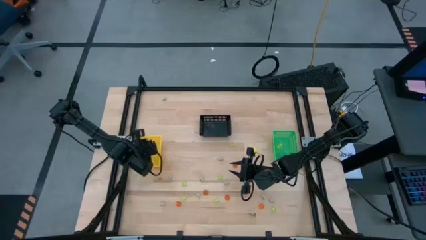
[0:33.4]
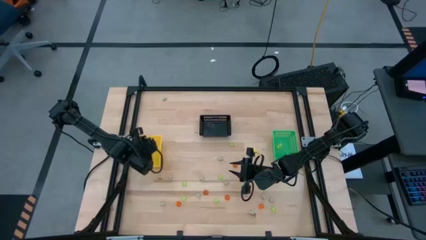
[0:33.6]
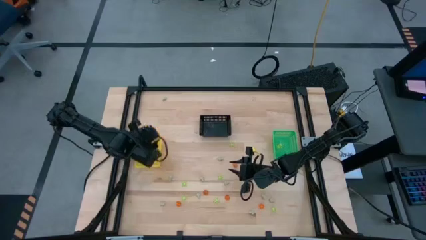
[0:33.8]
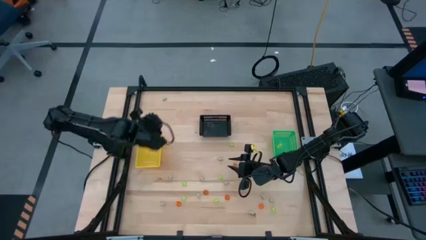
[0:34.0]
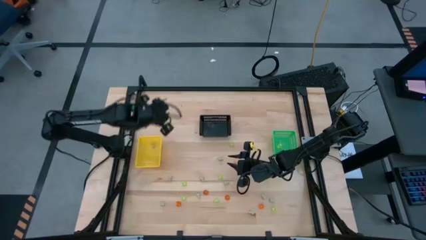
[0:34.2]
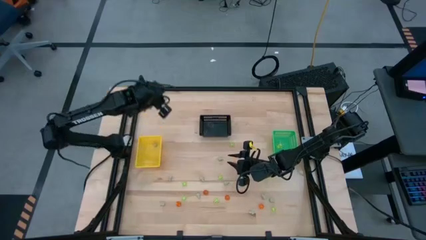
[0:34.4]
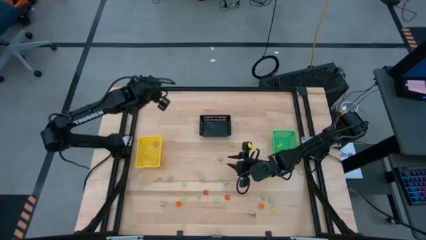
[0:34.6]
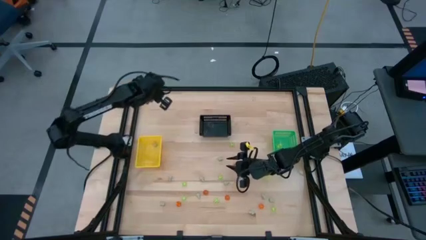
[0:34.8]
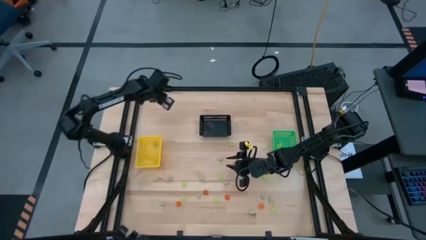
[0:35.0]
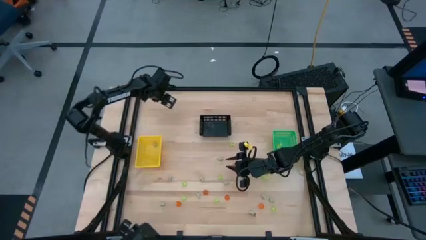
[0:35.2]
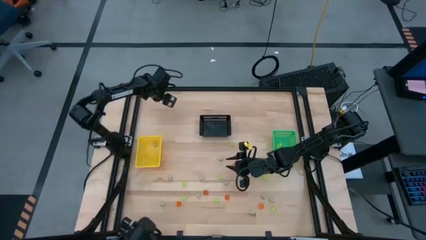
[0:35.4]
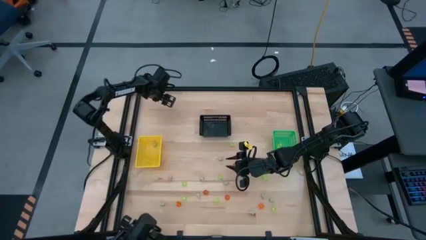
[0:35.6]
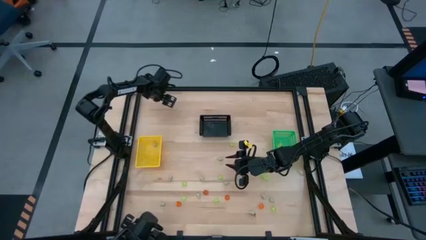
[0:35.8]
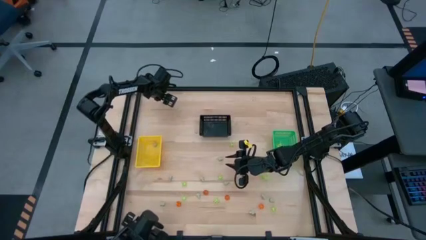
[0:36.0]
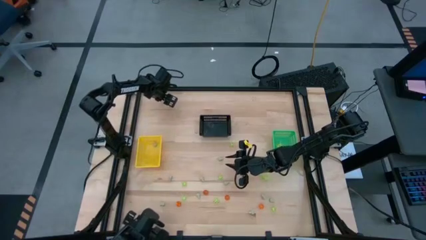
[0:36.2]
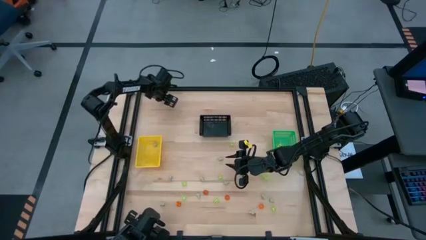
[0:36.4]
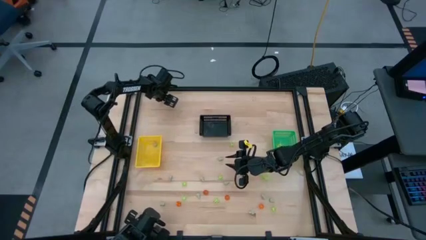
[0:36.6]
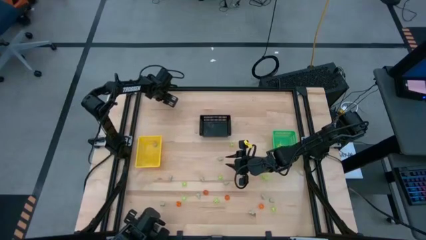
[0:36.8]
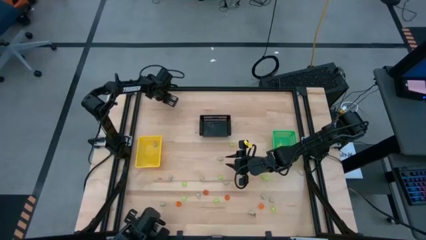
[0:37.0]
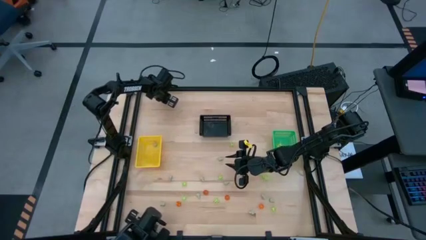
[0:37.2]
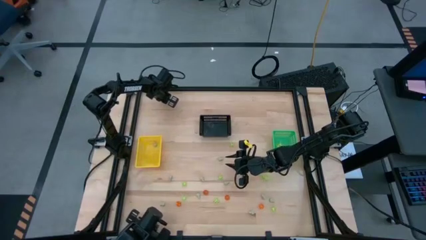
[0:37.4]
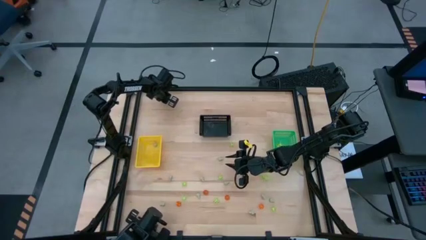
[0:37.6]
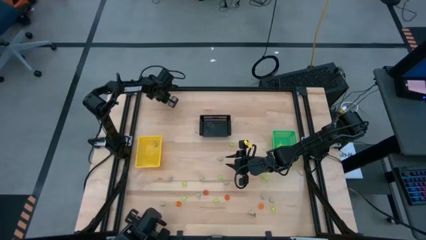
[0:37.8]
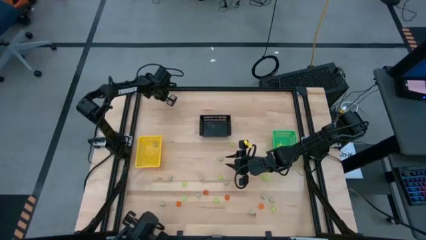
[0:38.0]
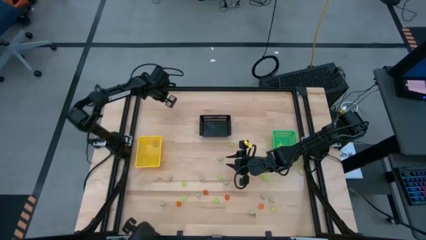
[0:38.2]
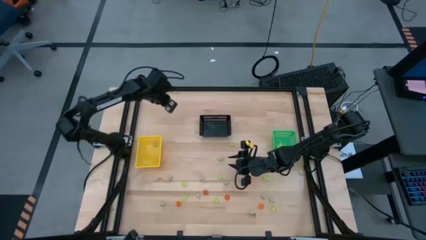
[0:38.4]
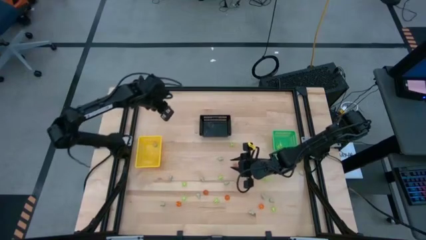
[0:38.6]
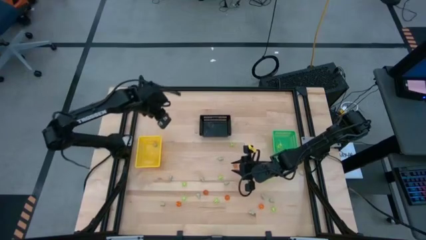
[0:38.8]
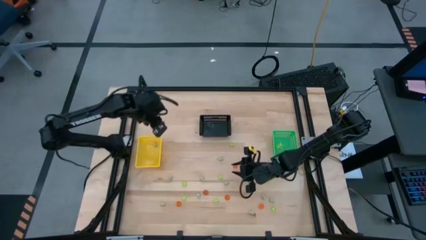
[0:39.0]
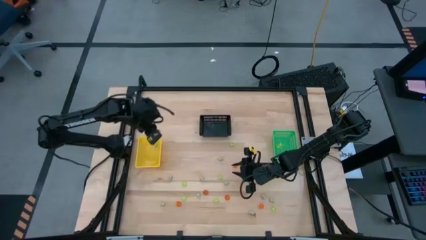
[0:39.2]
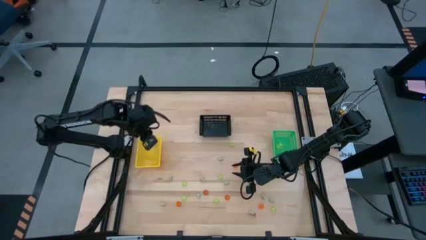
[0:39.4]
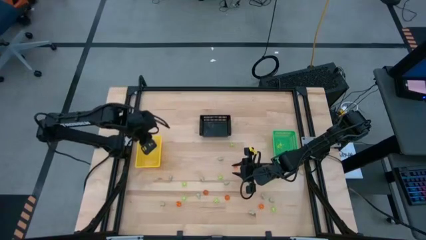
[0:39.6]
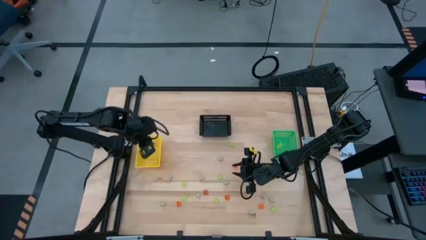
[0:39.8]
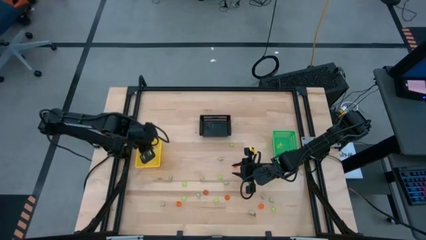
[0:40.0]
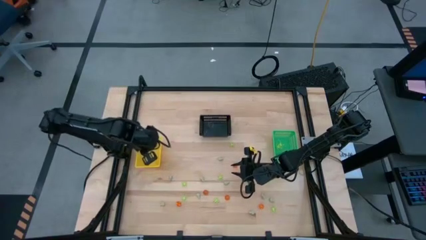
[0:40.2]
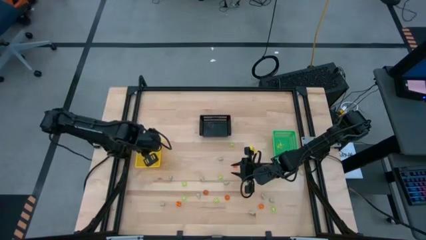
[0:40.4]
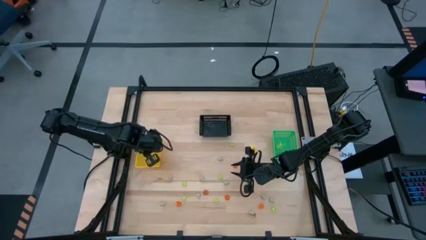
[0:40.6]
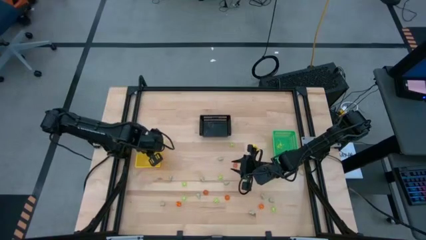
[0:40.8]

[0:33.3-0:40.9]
Task: Sort Halloween decoration
Put the white skull toy into the yellow bin

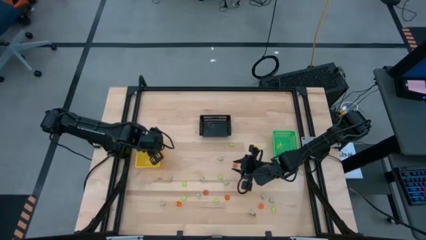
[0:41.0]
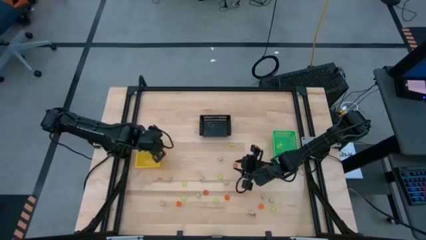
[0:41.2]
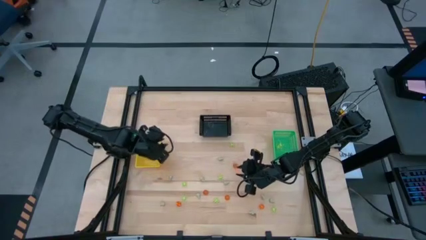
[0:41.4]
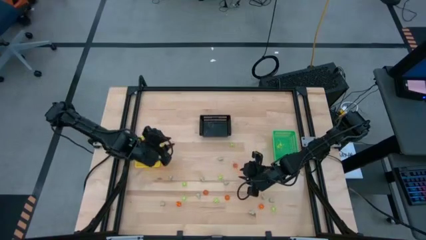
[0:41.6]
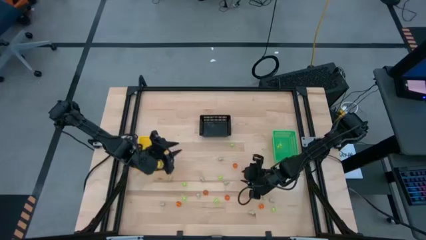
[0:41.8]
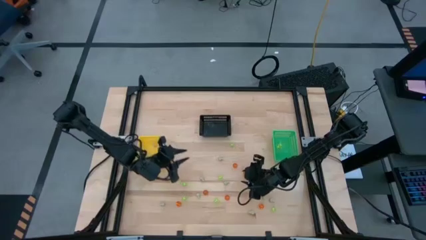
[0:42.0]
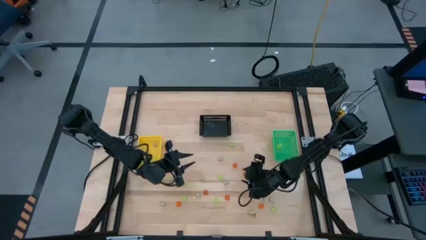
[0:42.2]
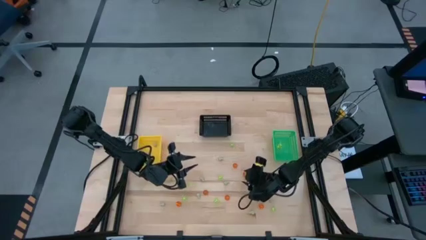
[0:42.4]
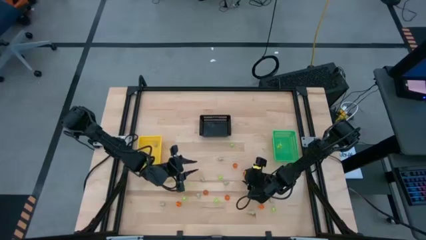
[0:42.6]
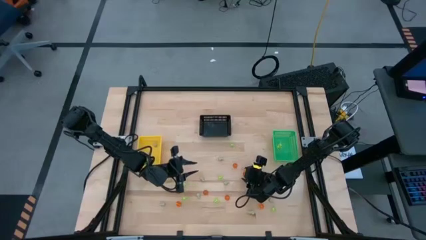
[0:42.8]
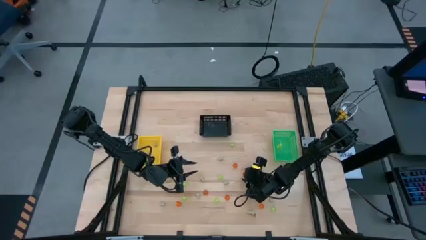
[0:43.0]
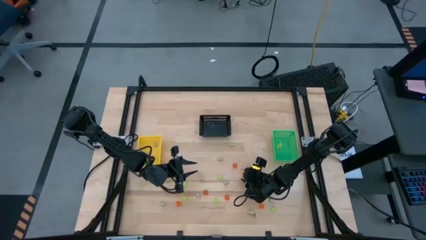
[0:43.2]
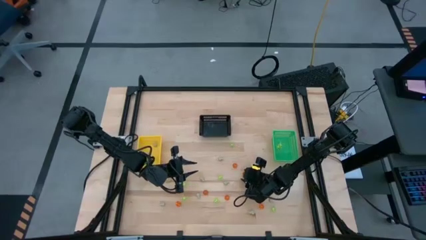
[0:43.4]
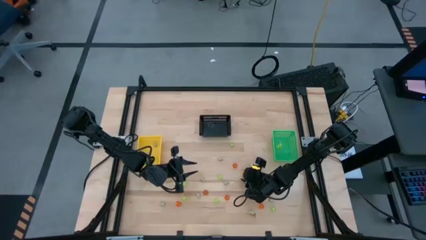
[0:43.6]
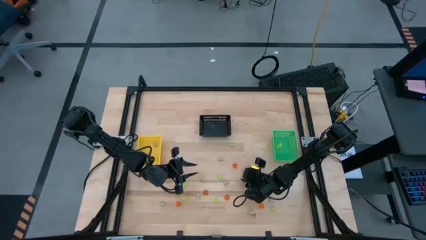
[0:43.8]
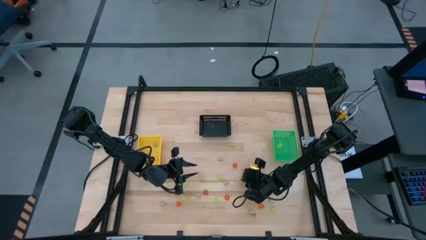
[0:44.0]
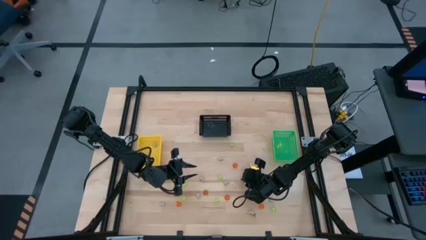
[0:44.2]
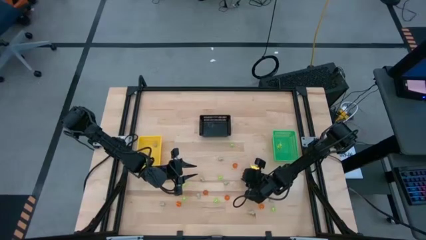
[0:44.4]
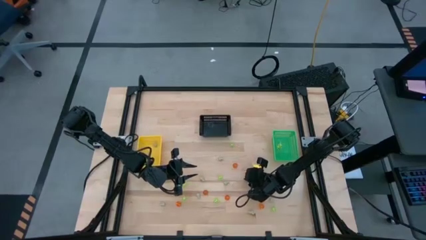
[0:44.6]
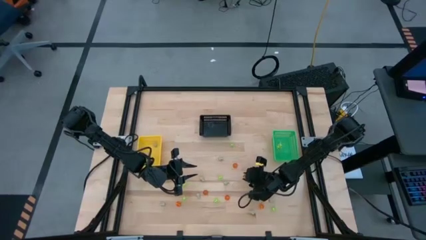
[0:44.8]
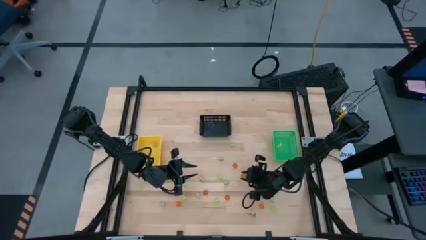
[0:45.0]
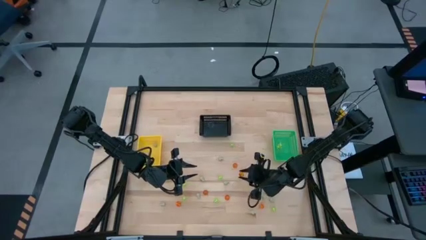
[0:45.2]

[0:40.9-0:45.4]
Put the orange pumpkin toy into the black bin
